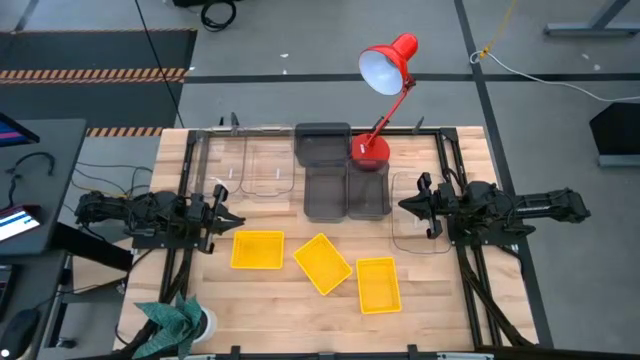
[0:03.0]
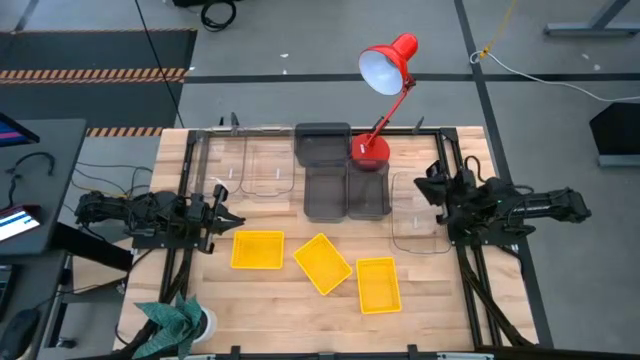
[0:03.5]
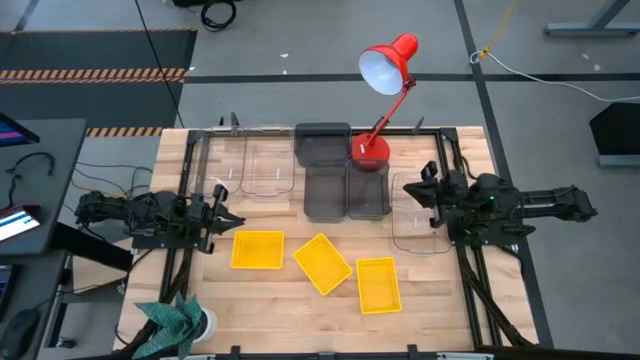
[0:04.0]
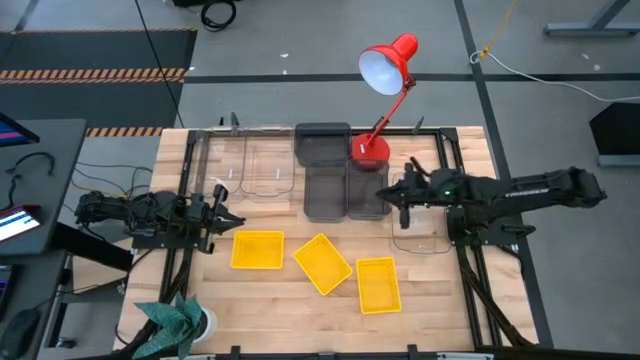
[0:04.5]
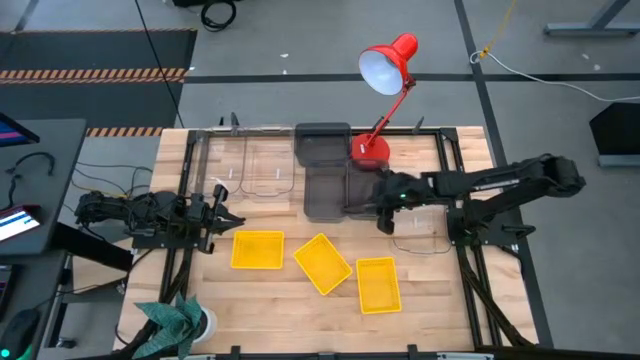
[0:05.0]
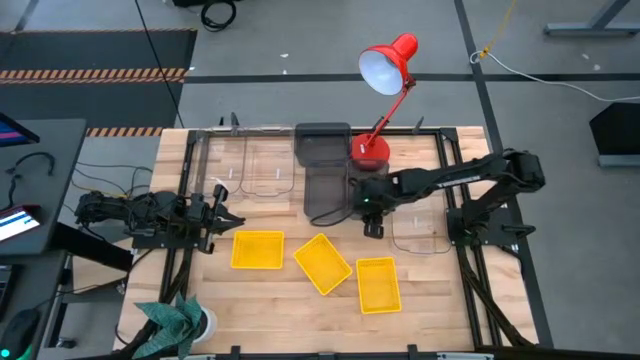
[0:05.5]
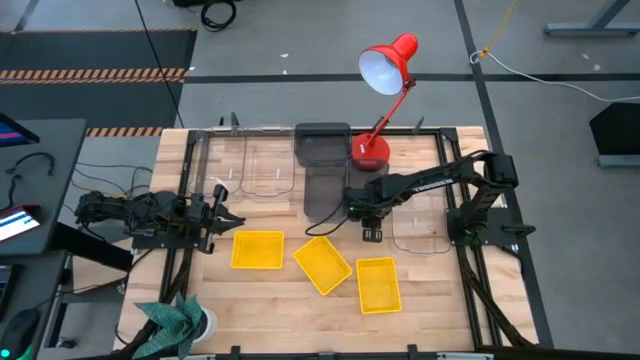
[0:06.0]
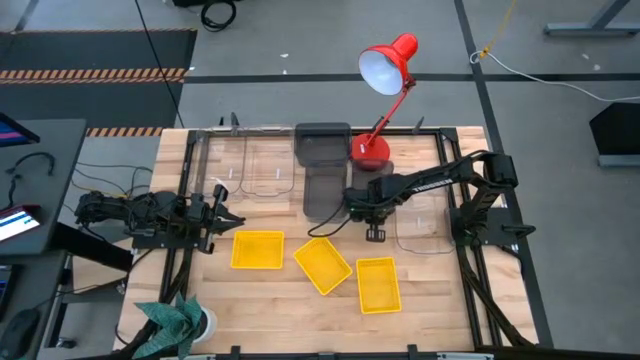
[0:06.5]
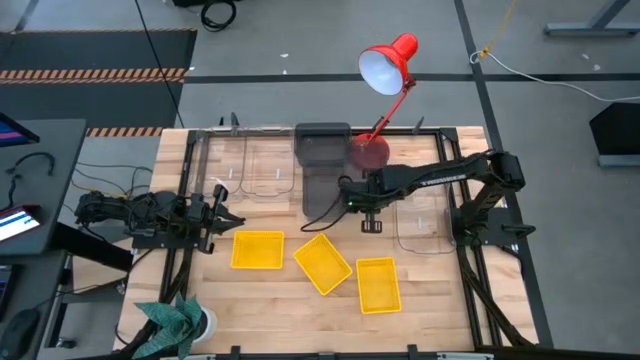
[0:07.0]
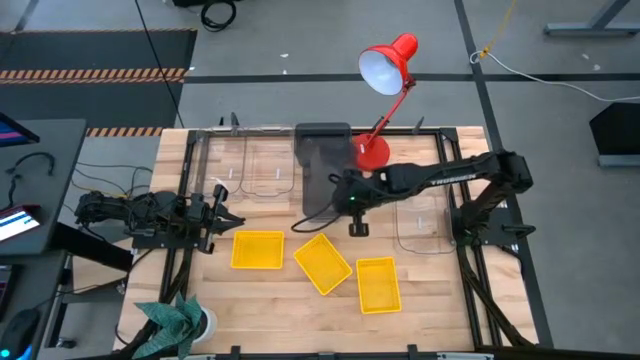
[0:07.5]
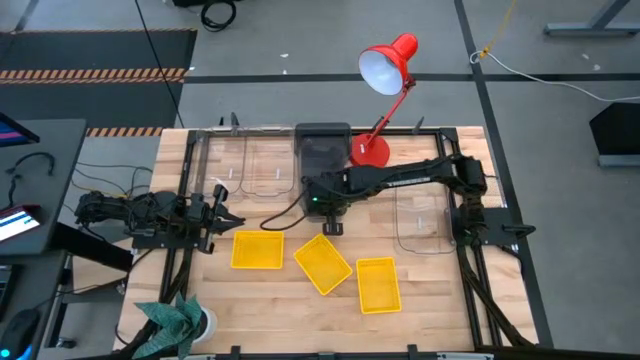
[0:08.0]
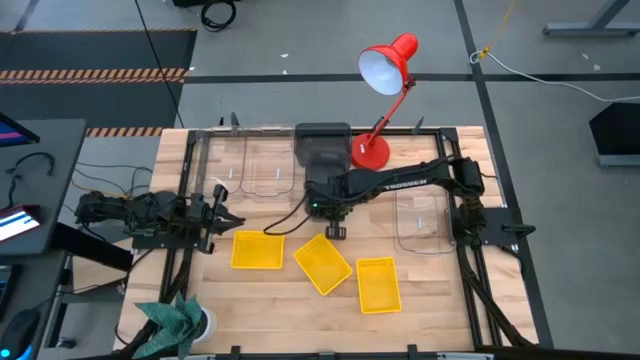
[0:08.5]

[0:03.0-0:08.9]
Stack the bottom right black bin on the bottom left black bin

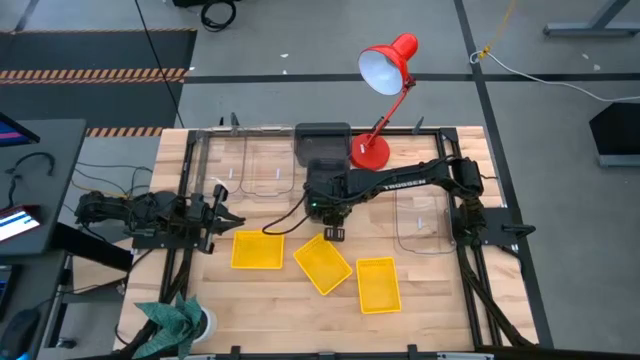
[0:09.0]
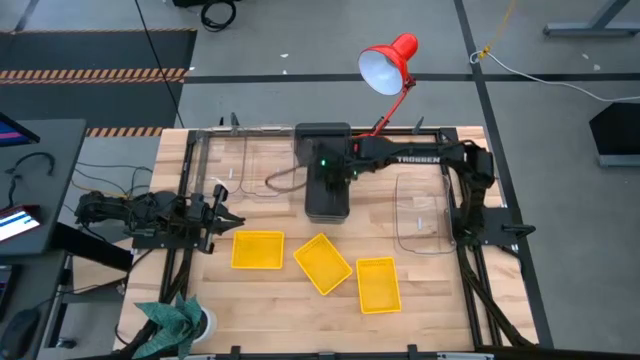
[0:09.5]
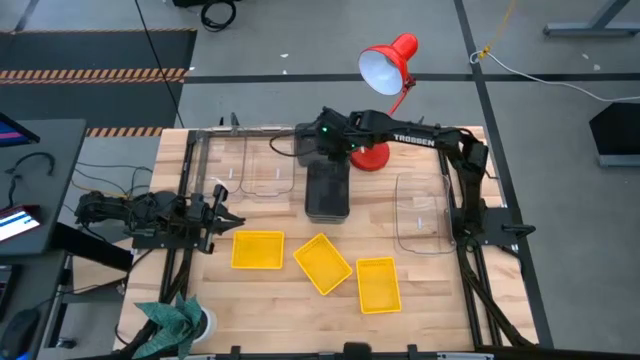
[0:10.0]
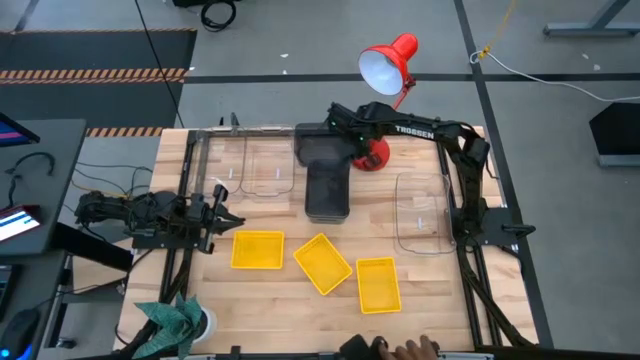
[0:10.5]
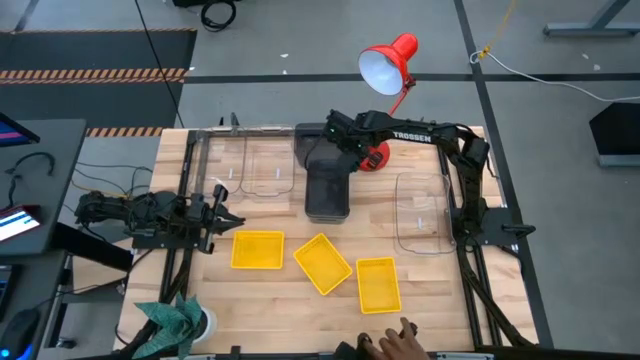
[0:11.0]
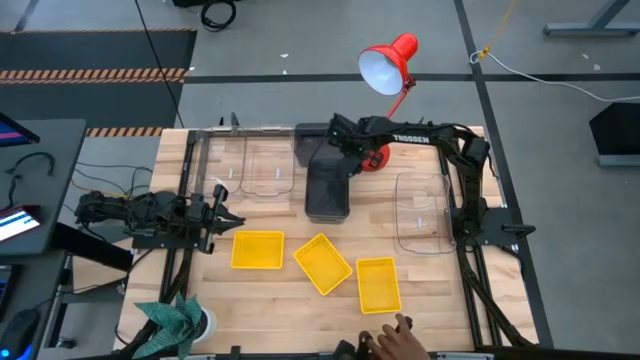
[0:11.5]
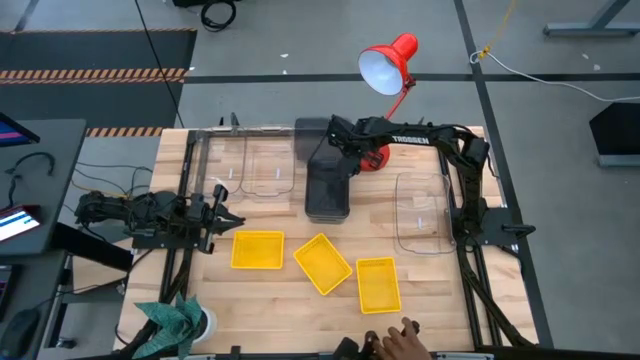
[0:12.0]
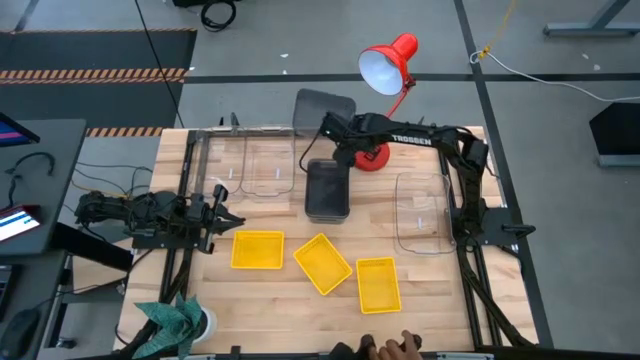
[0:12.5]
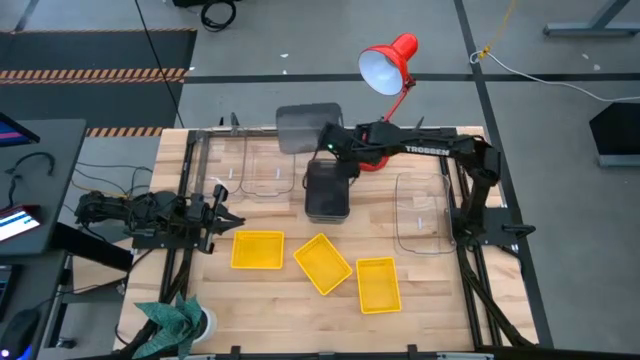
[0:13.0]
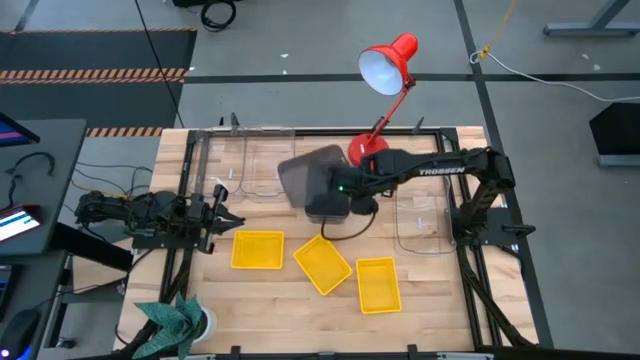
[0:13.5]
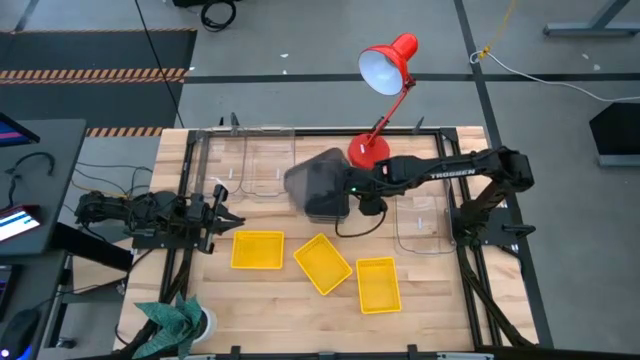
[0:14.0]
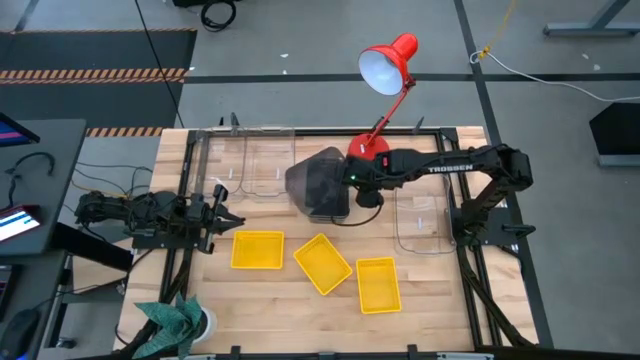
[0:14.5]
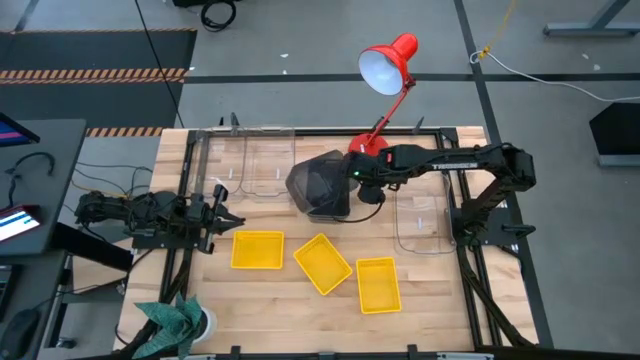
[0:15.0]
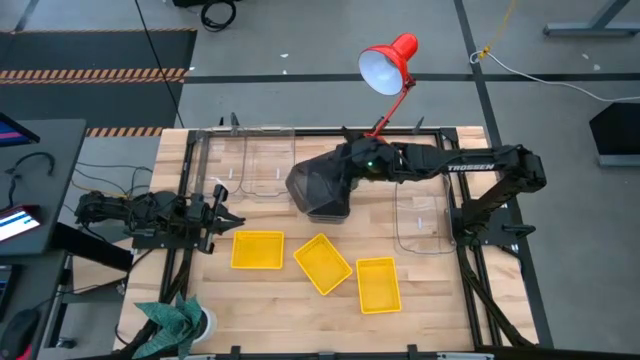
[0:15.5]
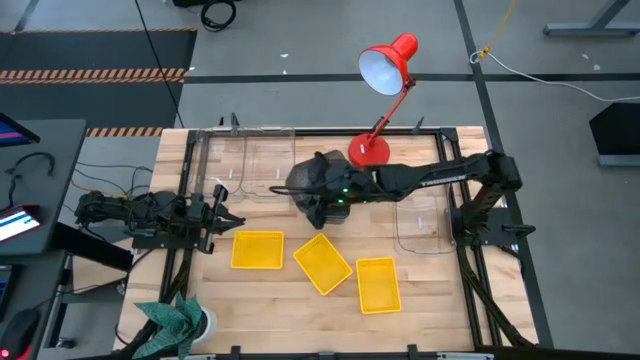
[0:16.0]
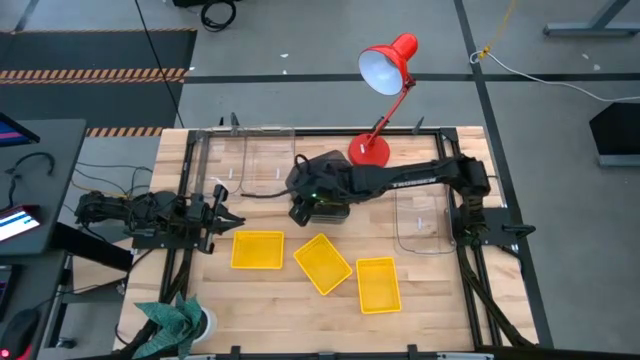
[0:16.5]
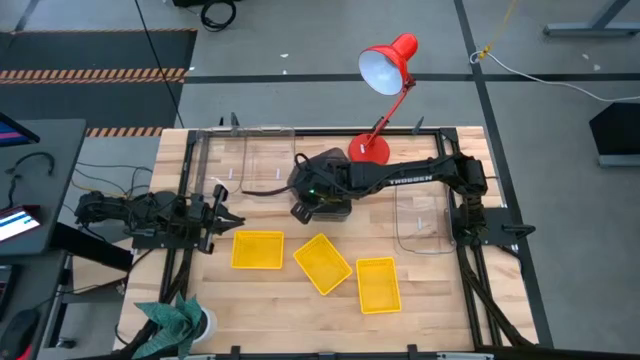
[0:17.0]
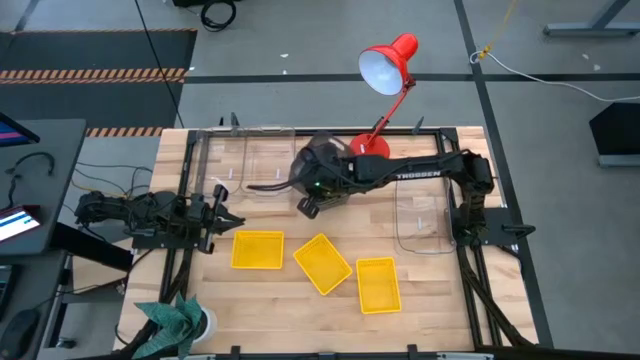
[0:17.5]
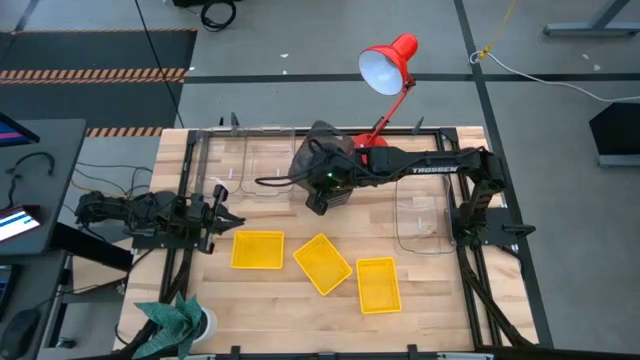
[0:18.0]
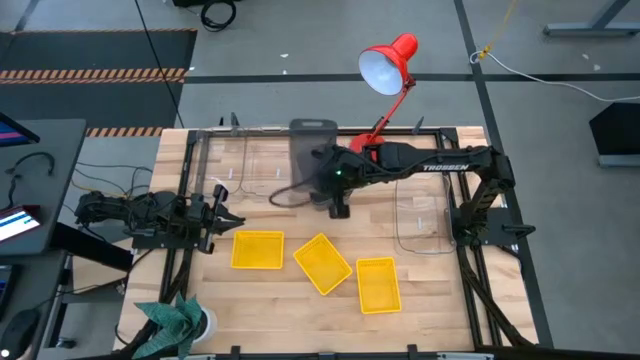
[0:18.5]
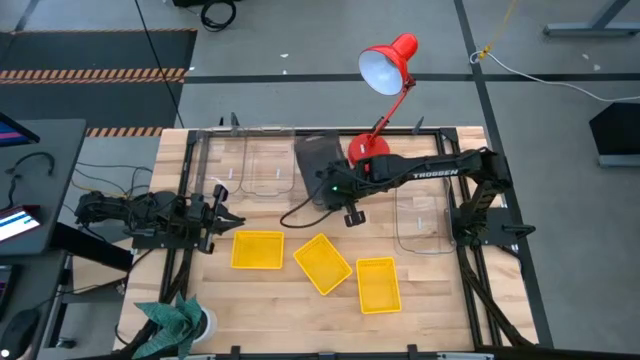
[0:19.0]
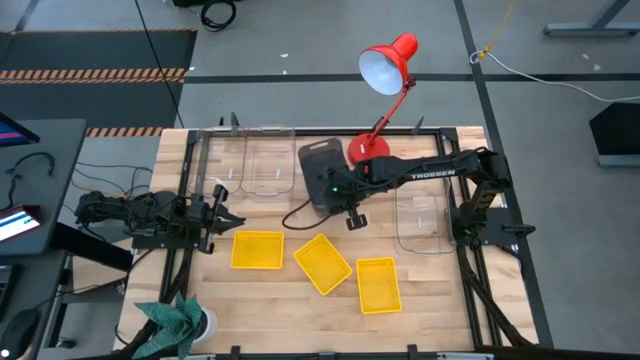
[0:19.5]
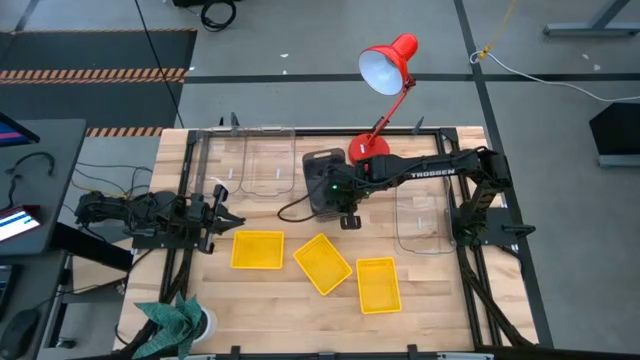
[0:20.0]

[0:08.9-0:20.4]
Stack the top black bin on the stacked black bins
